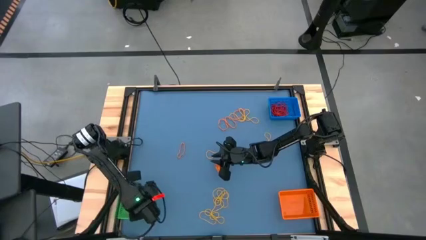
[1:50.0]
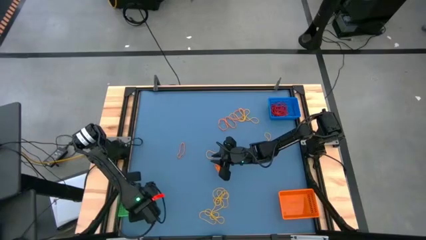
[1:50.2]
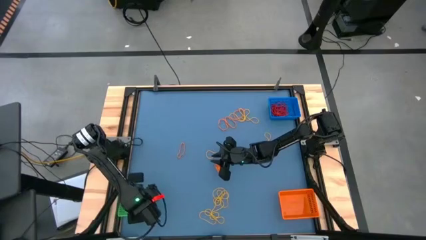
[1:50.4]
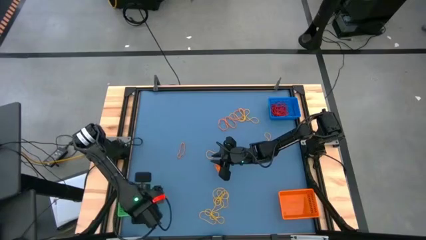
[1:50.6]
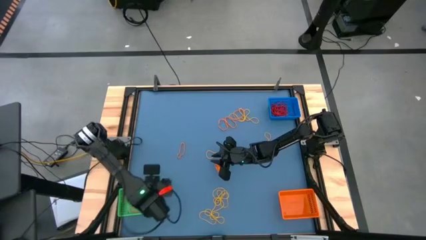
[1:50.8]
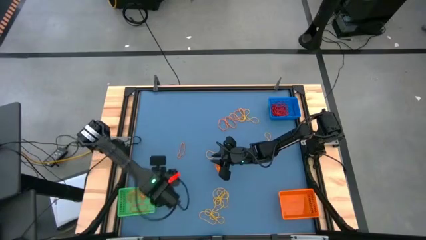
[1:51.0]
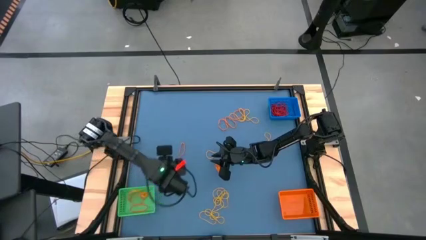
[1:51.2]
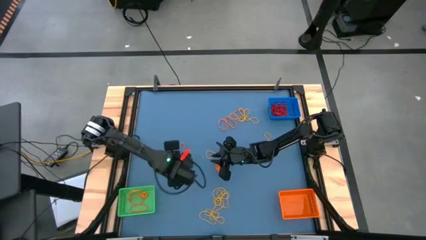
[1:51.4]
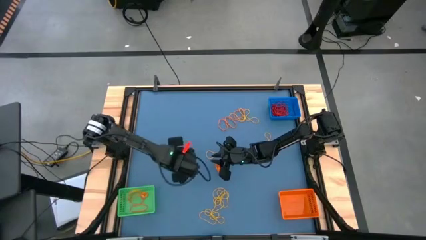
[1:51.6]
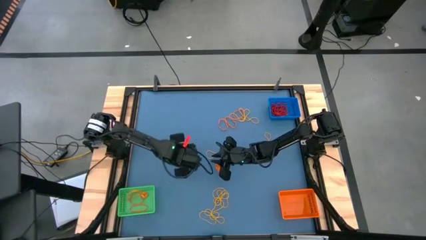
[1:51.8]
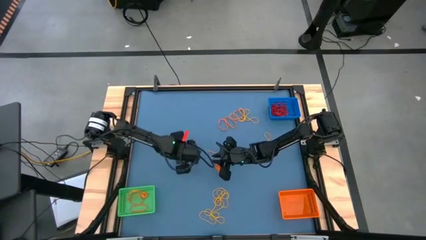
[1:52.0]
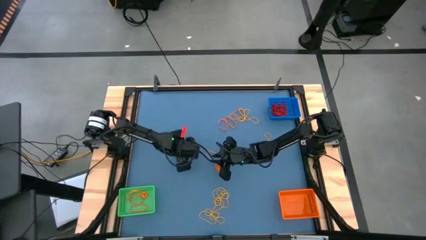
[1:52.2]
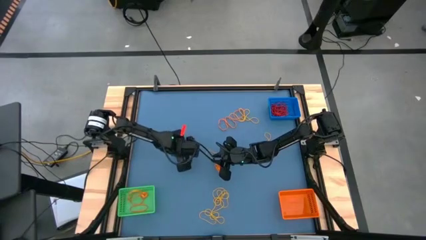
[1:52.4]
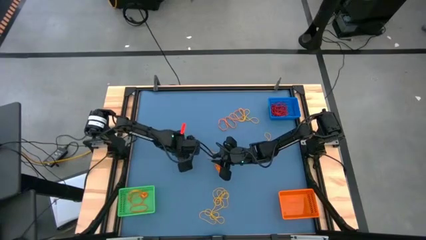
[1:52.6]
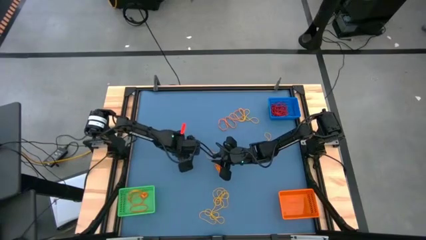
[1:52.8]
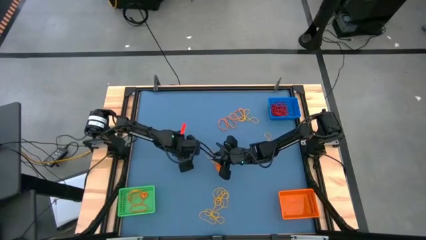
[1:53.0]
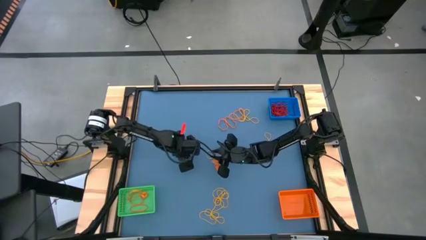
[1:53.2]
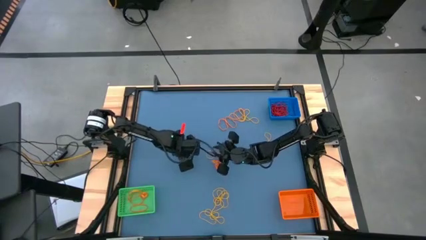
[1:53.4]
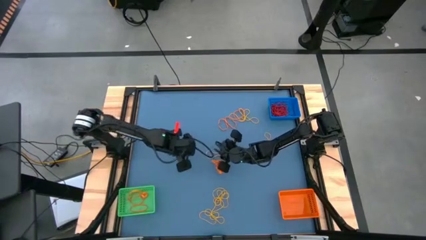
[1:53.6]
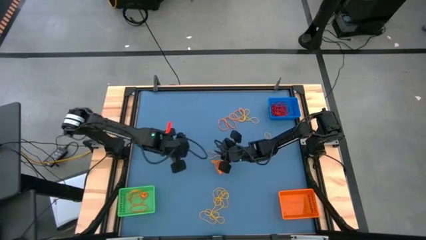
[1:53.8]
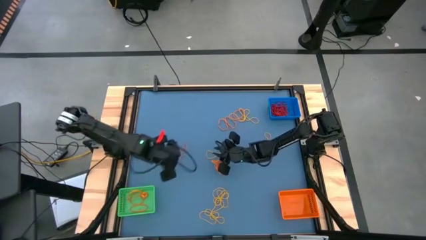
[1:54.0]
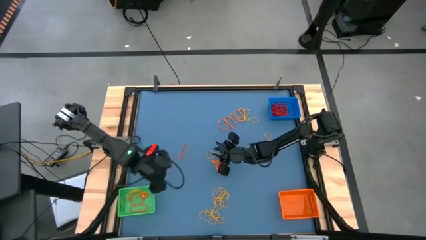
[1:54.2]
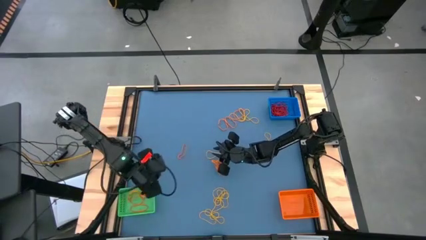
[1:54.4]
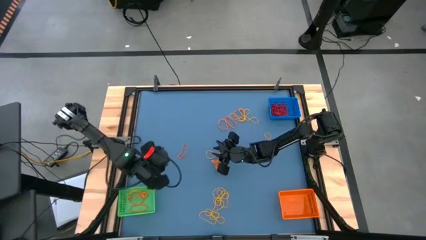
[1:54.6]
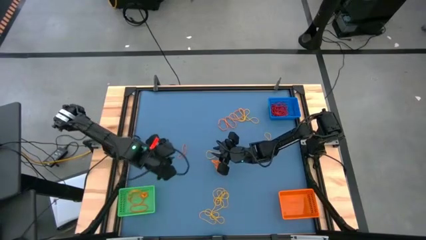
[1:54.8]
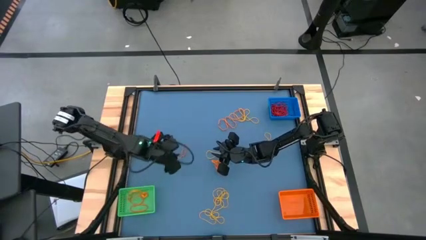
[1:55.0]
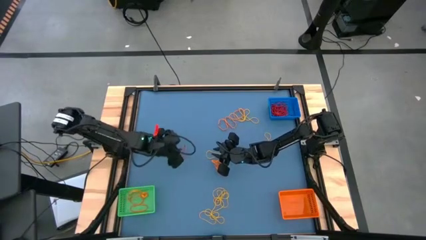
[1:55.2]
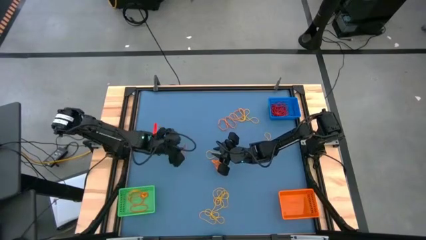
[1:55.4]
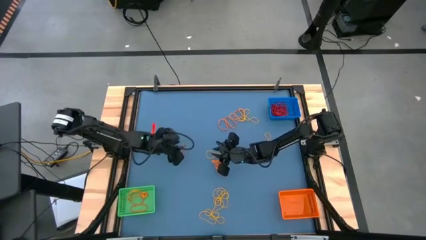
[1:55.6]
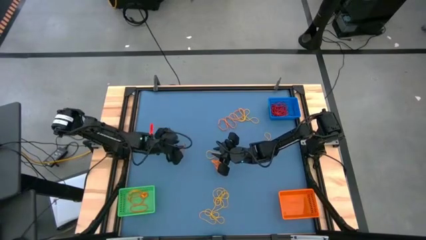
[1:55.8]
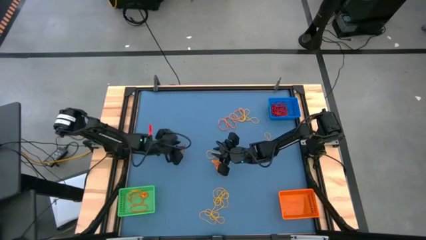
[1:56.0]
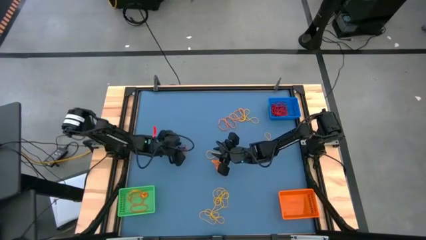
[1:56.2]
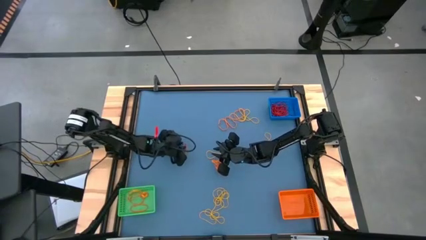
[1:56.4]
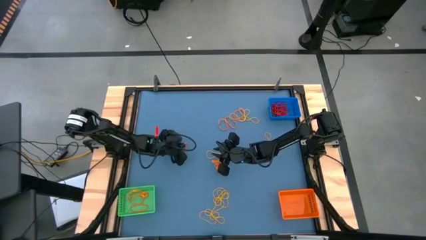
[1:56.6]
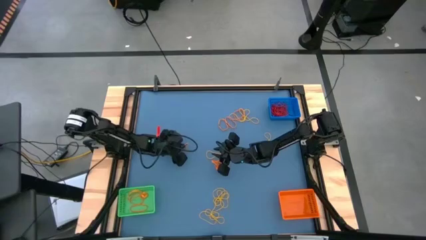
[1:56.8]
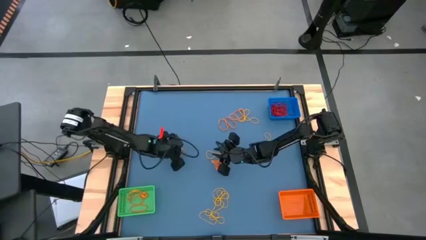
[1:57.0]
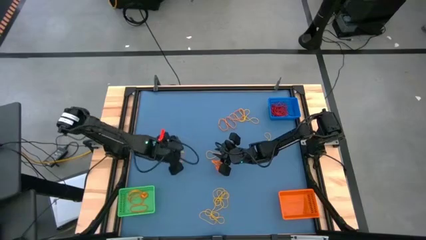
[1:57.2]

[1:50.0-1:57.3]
Task: Sort rubber bands into baskets
Put the orange rubber band into the green bin

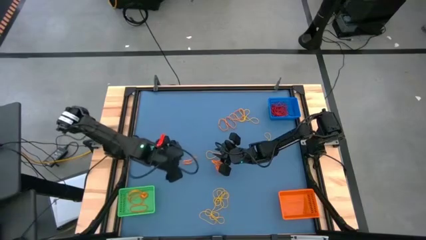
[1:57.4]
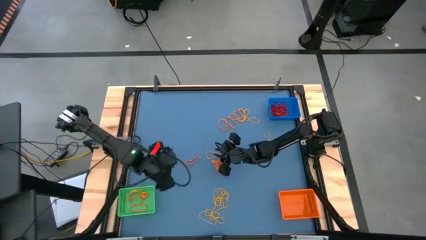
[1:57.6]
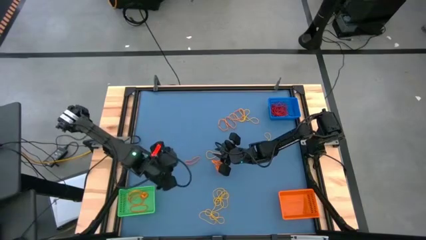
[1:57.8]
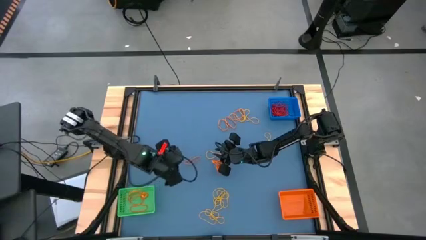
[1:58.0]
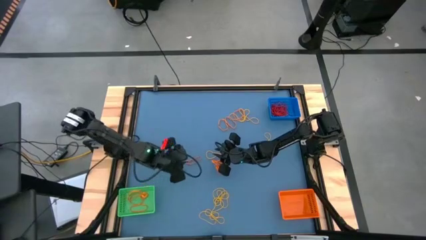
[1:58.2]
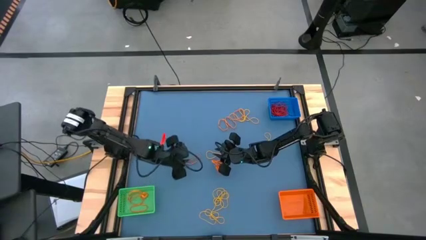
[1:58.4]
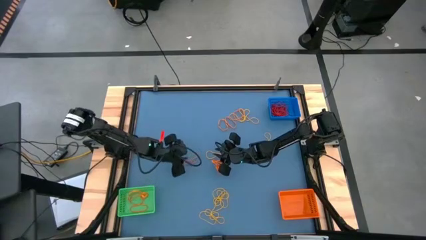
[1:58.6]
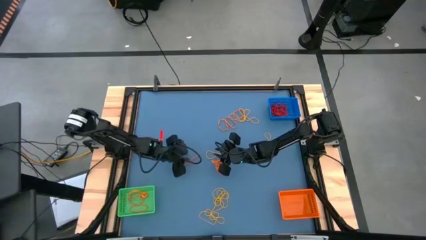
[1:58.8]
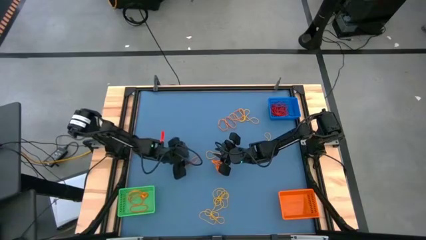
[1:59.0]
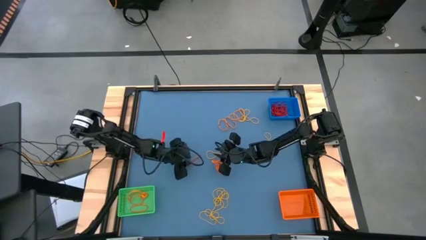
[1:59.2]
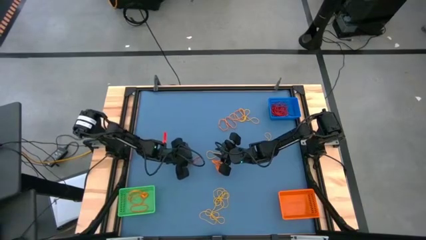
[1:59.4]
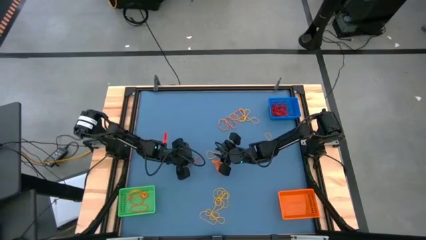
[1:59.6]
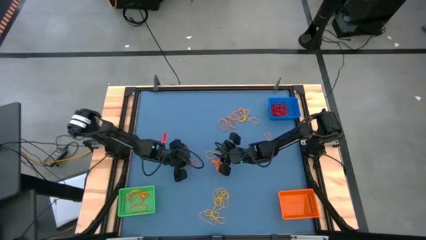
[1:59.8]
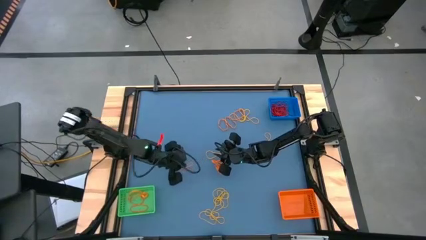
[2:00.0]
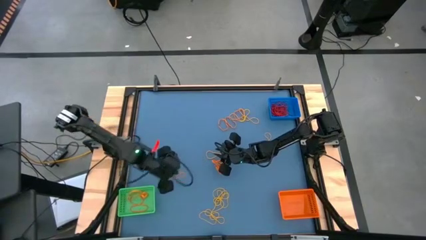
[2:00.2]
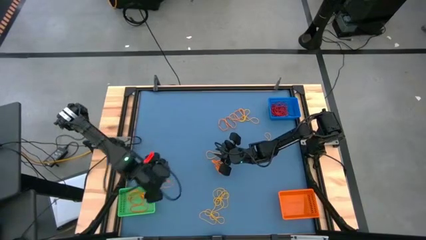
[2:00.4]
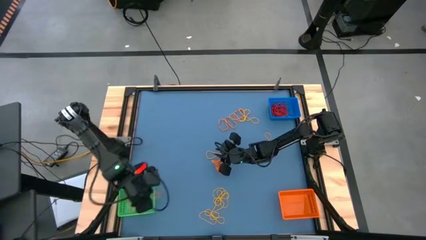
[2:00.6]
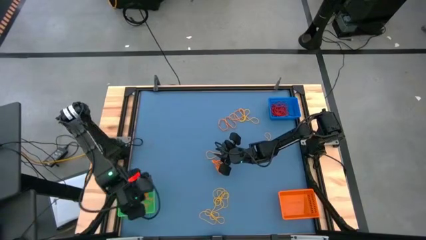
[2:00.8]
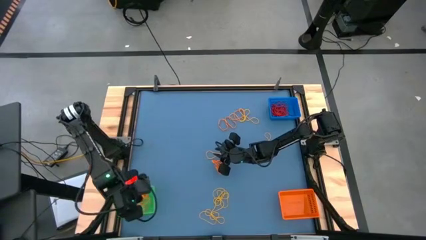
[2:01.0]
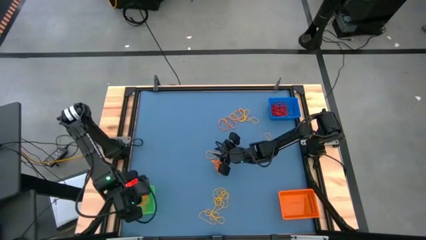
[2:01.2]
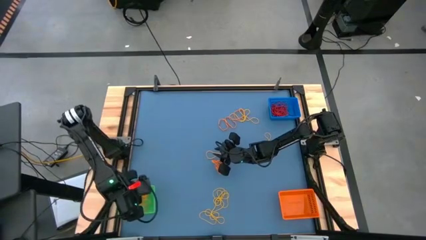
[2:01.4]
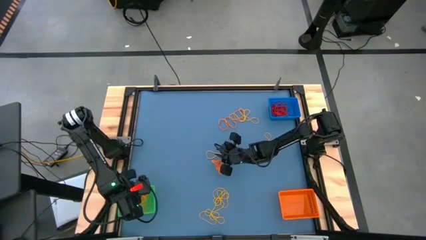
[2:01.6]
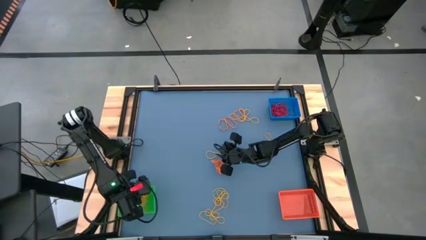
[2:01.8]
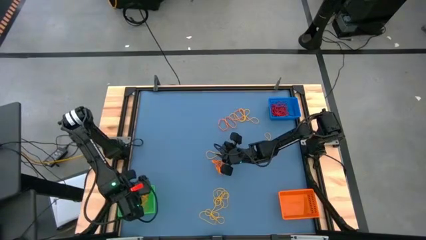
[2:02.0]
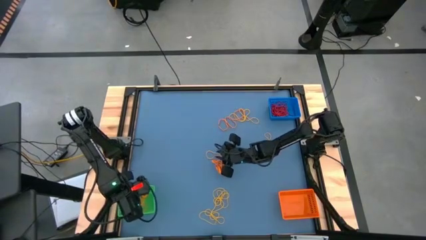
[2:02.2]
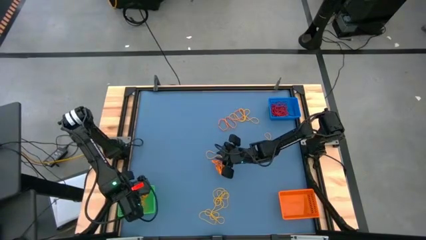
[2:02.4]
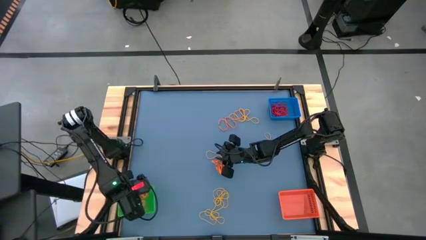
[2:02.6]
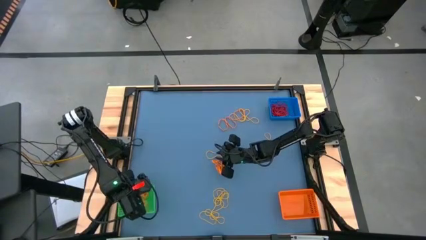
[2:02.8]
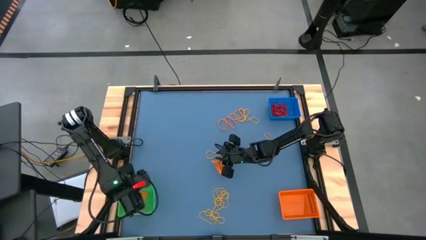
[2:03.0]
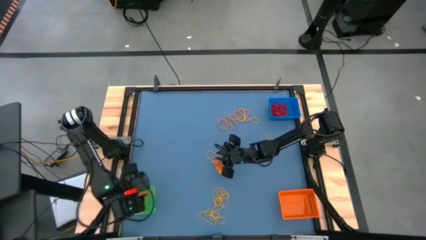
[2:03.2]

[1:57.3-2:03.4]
Put the orange rubber band into the green bin

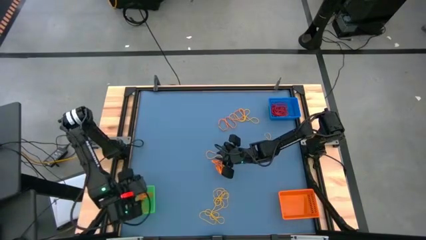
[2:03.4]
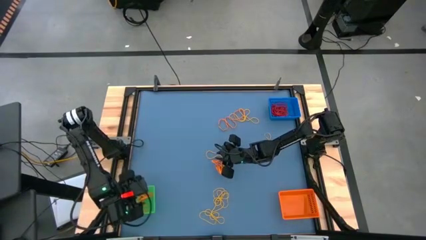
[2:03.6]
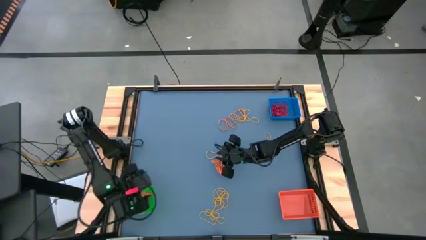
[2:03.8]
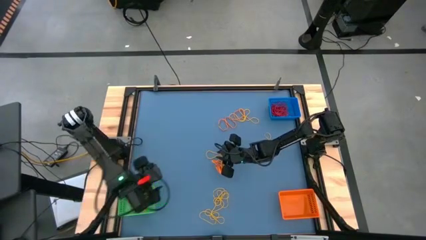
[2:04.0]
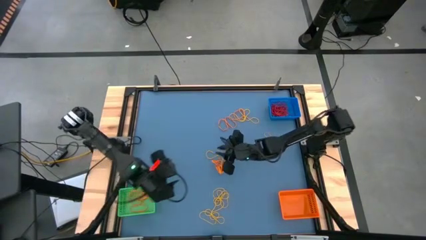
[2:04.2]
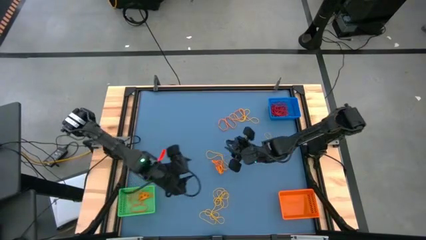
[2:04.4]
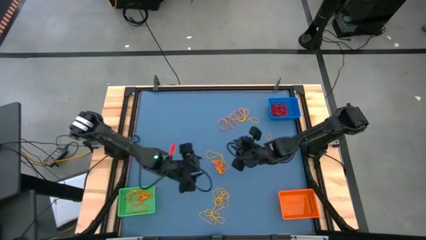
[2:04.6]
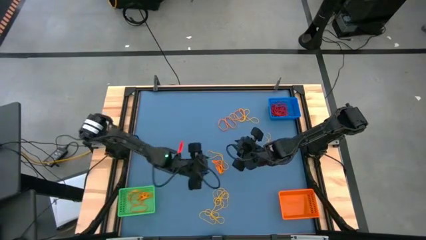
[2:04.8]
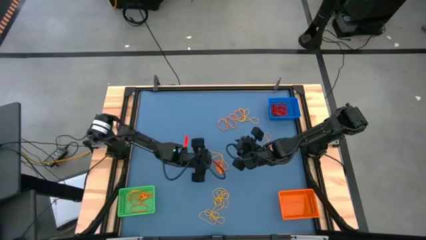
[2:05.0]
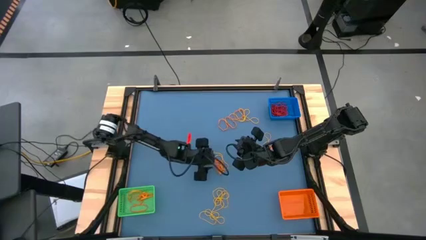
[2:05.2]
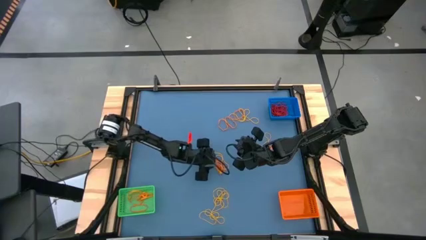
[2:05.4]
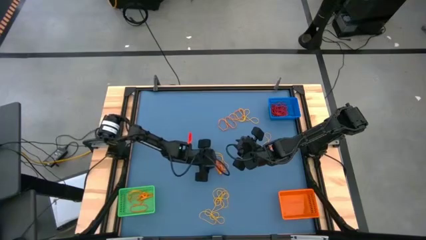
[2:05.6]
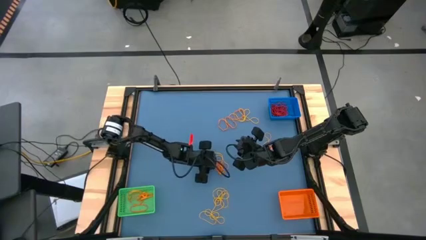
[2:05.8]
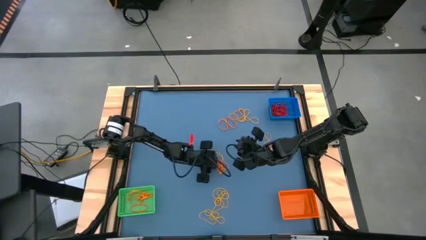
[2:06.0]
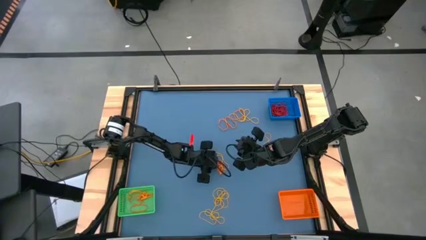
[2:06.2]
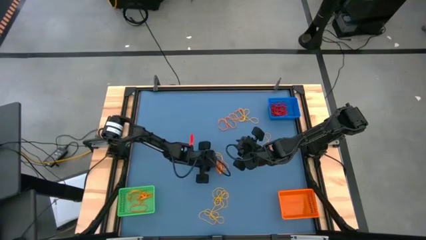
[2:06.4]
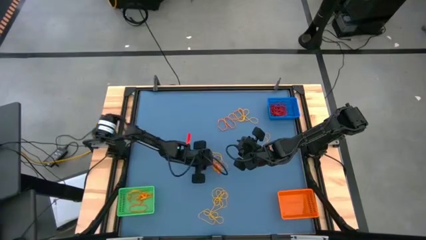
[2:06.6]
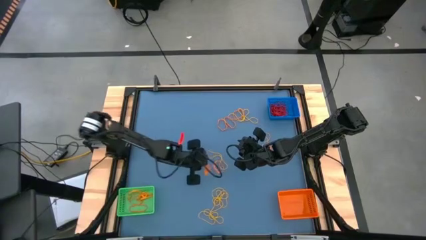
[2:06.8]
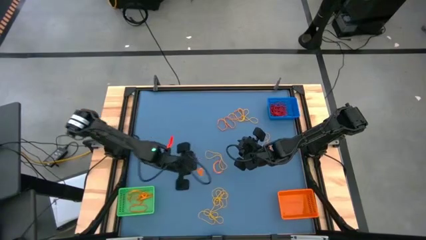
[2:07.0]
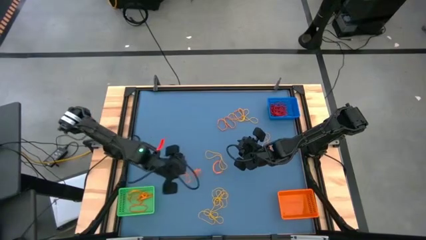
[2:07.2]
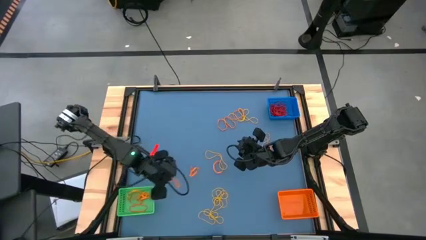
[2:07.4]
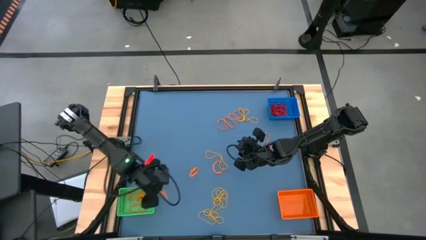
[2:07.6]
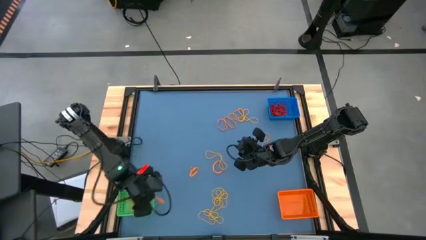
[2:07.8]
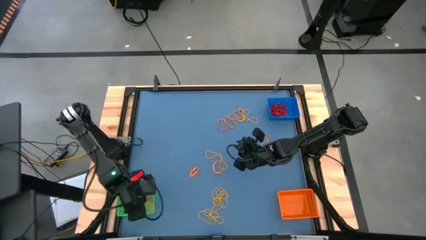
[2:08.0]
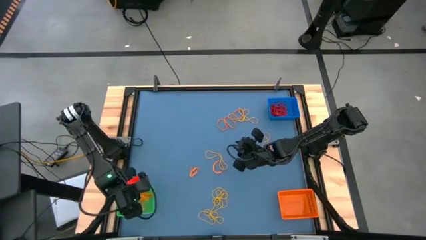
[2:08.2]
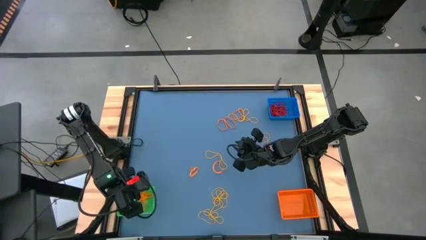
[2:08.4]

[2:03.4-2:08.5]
Put the orange rubber band into the green bin
